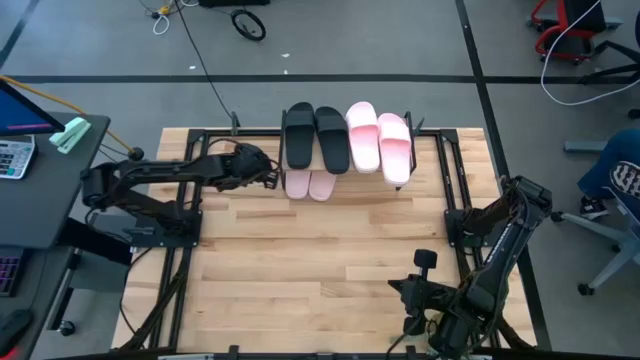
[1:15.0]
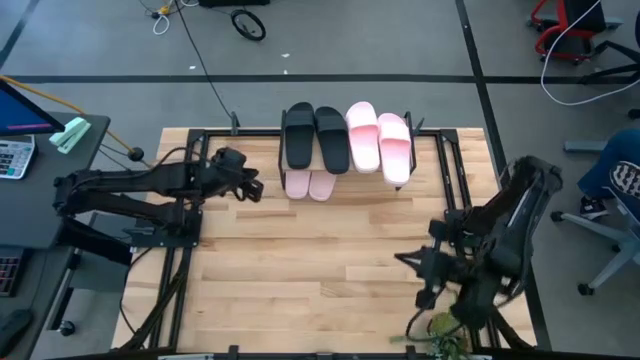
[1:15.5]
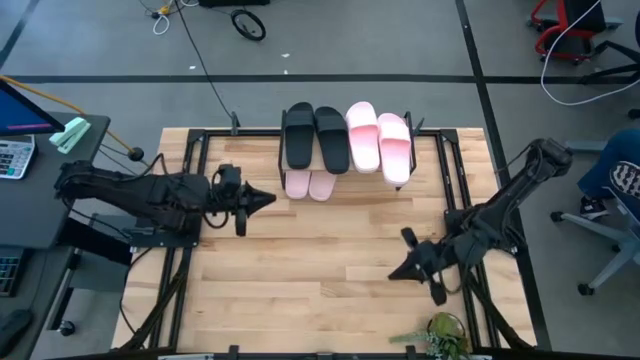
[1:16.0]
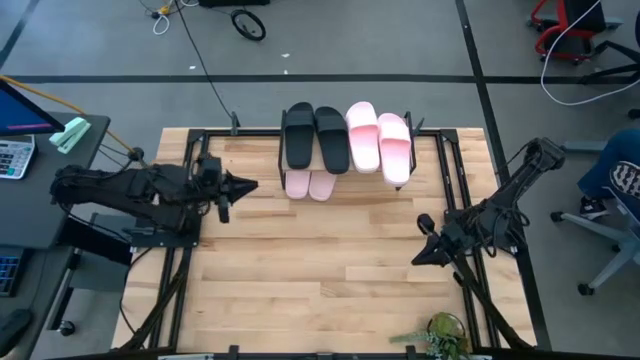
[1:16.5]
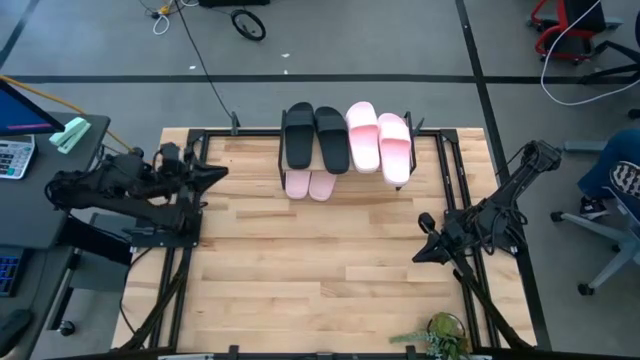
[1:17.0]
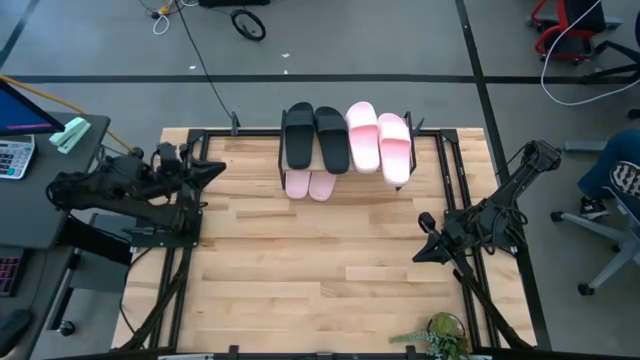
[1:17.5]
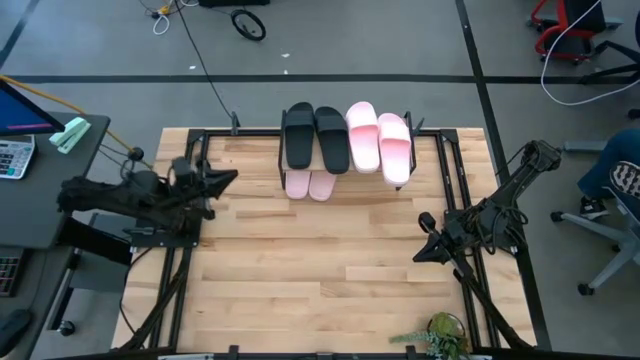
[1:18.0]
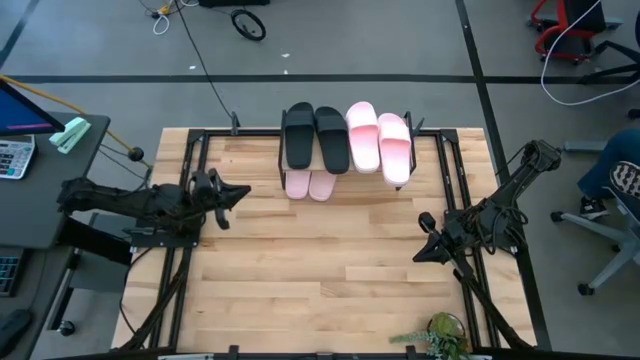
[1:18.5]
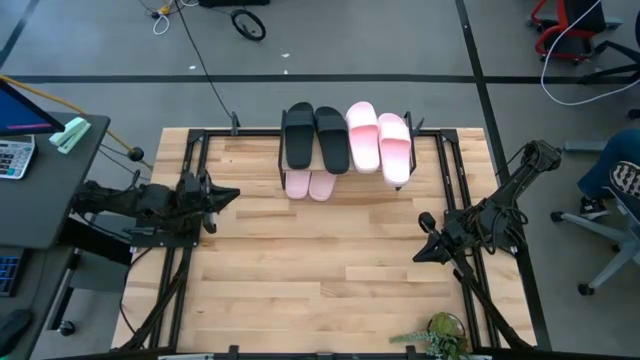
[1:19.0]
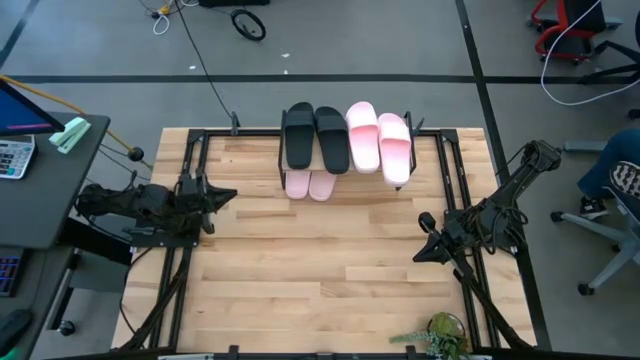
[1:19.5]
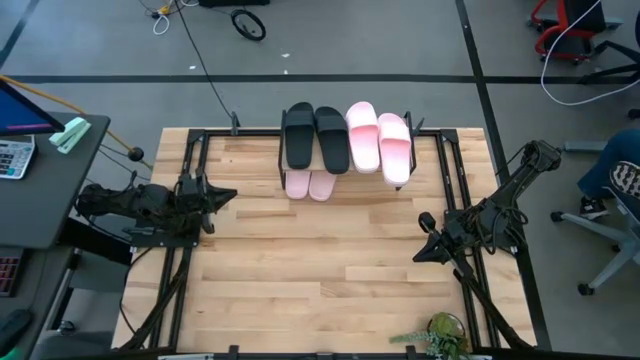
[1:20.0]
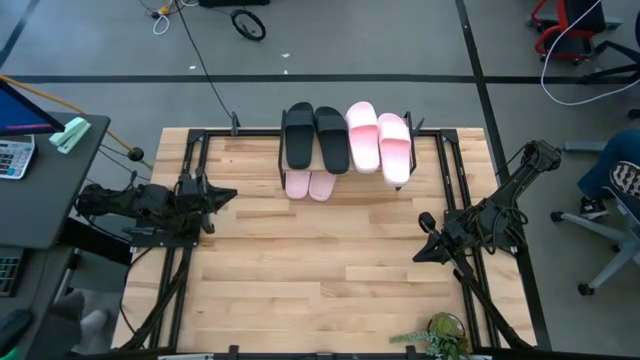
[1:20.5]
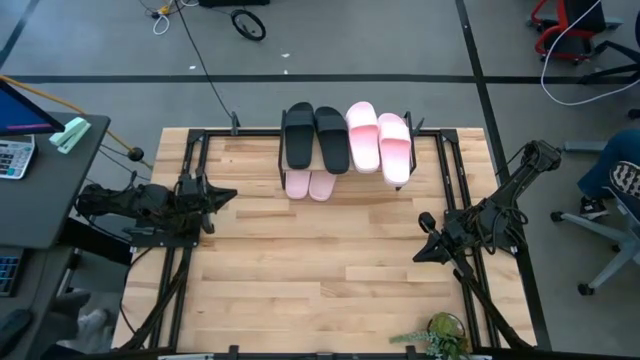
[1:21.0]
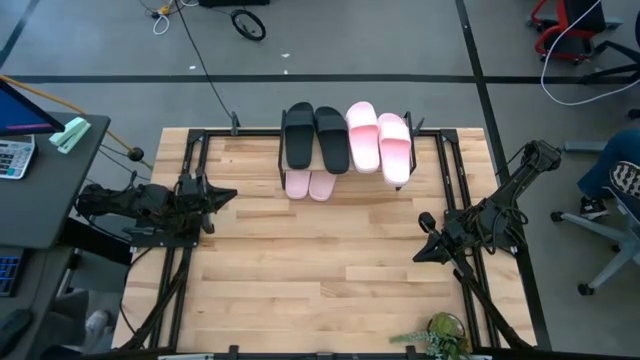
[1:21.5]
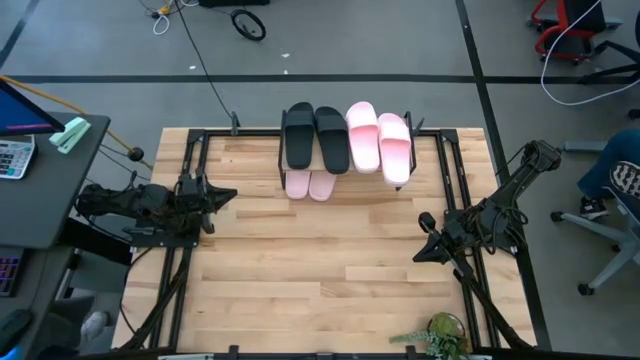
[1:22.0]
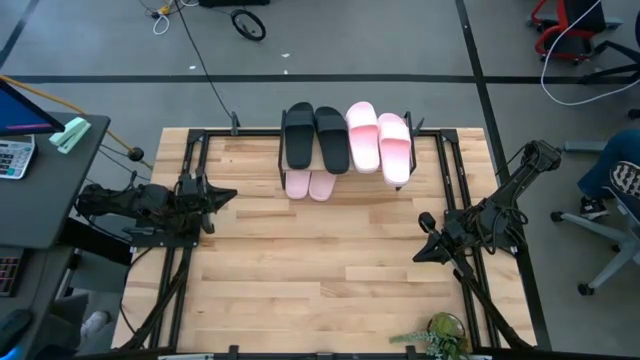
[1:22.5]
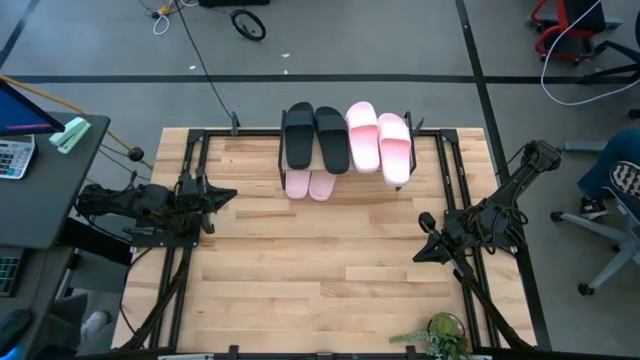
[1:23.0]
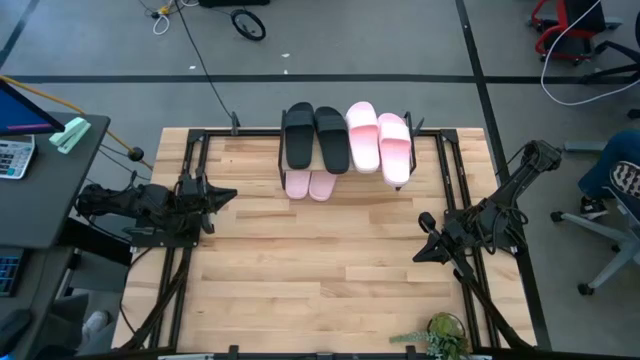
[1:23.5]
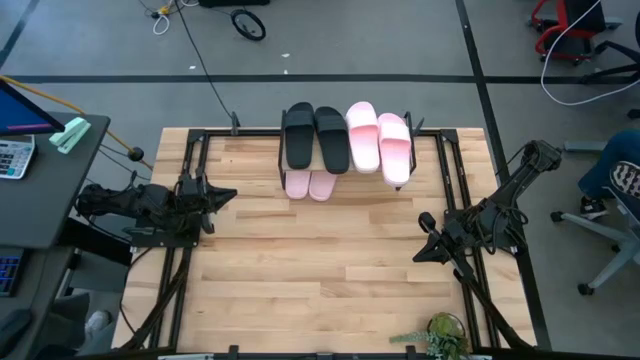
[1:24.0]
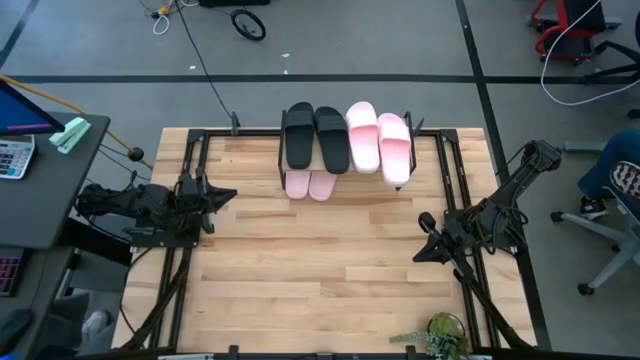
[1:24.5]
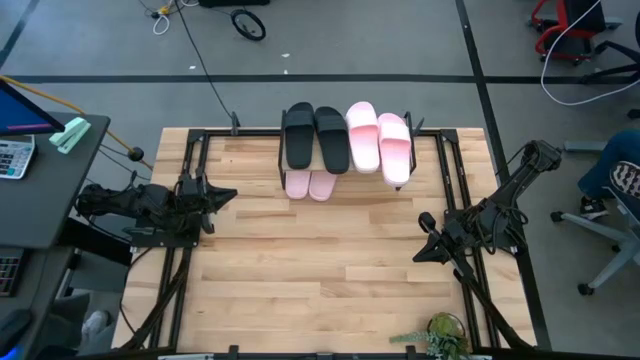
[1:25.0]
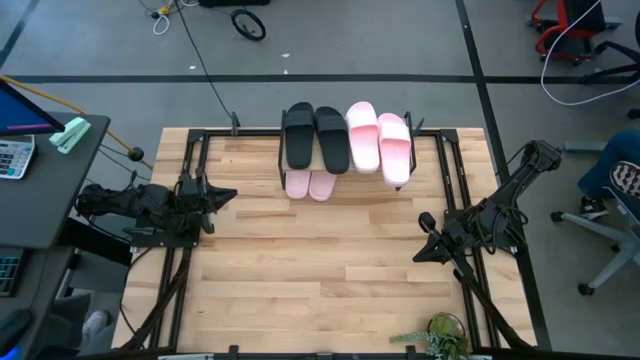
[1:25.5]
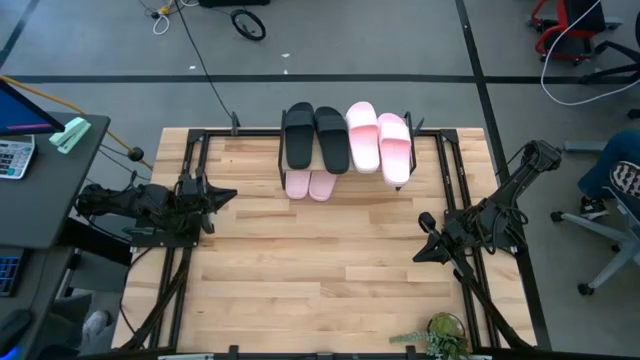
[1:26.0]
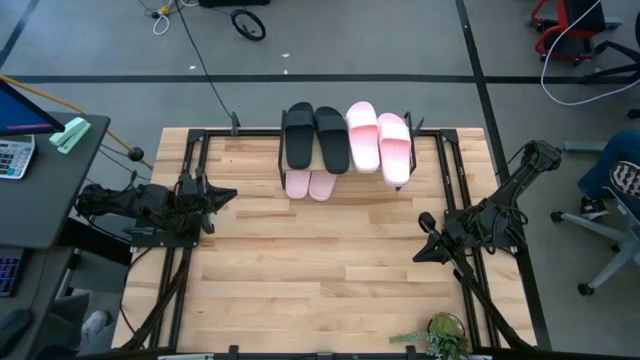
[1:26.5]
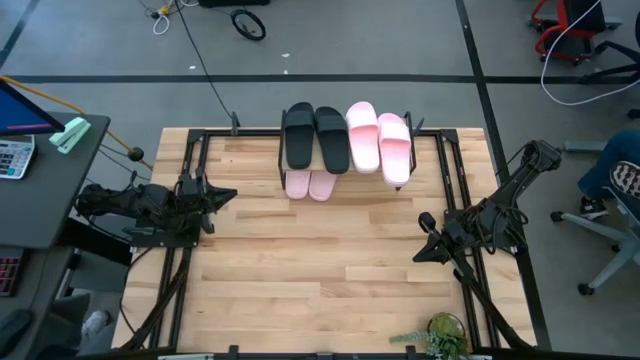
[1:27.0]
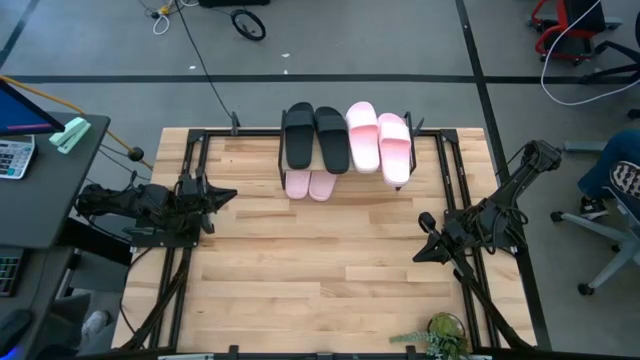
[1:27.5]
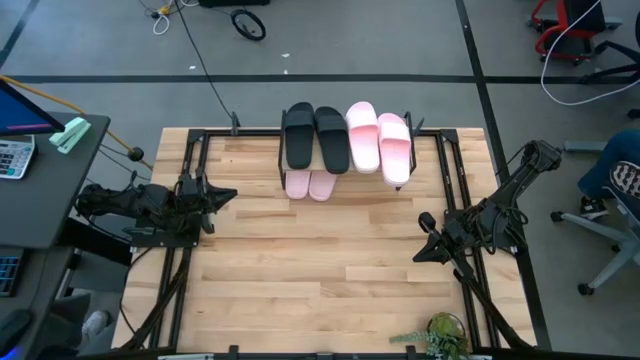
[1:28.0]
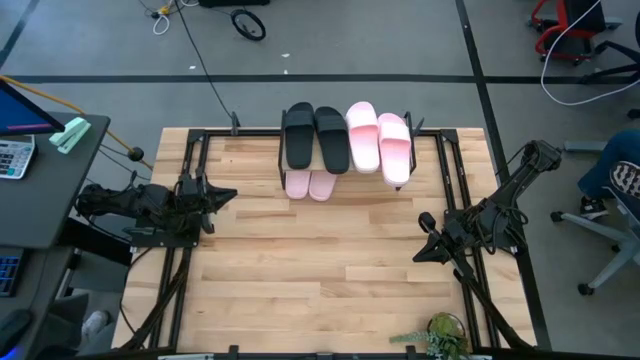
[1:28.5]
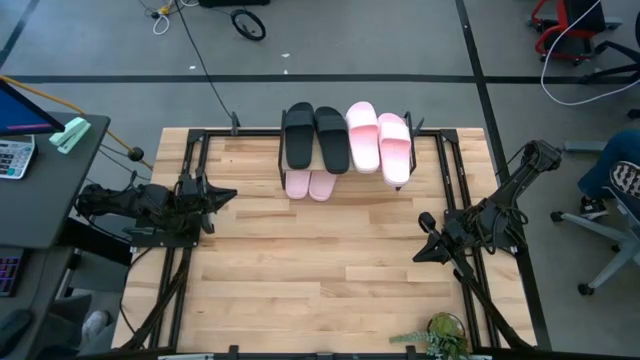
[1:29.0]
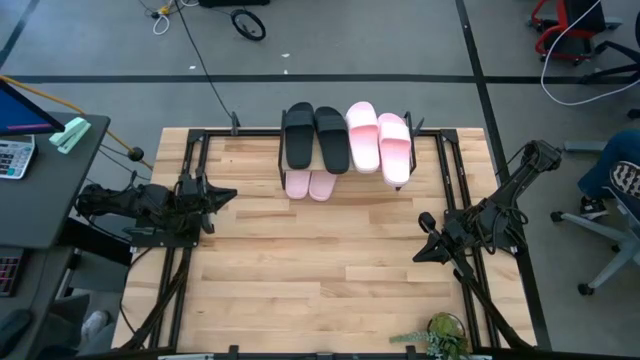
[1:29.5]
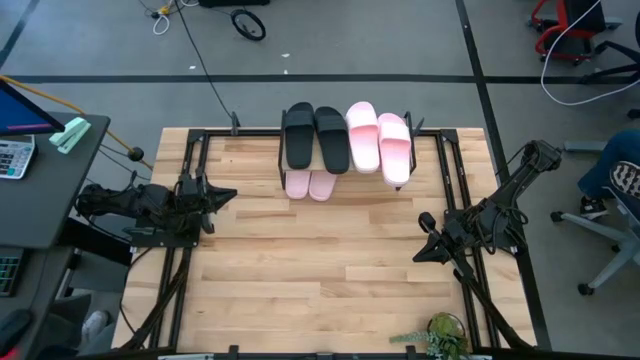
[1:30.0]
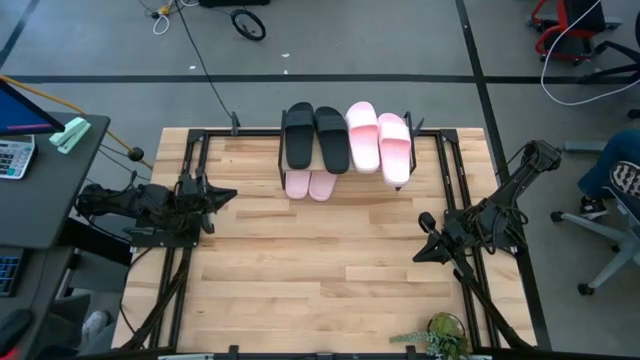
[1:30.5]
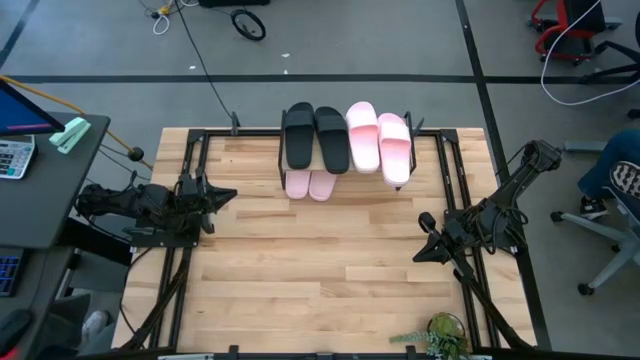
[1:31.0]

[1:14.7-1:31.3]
Task: Pick and place slides into the shelf
Return to Home Position

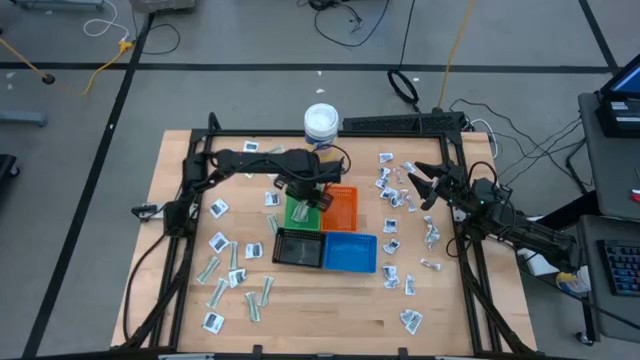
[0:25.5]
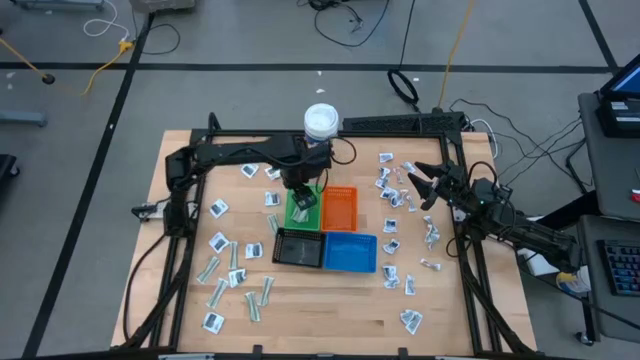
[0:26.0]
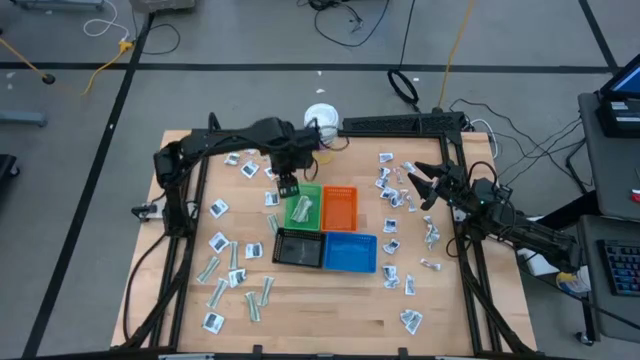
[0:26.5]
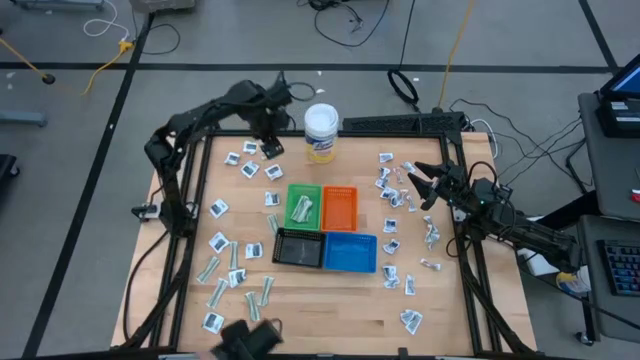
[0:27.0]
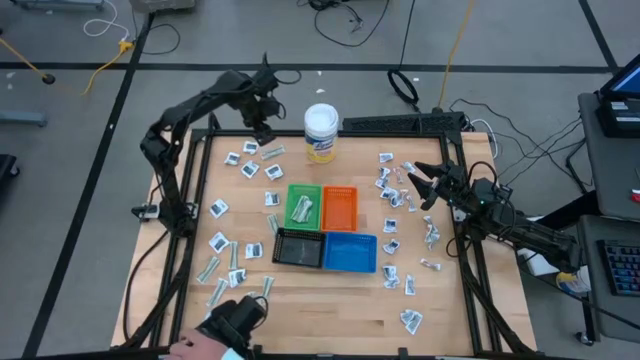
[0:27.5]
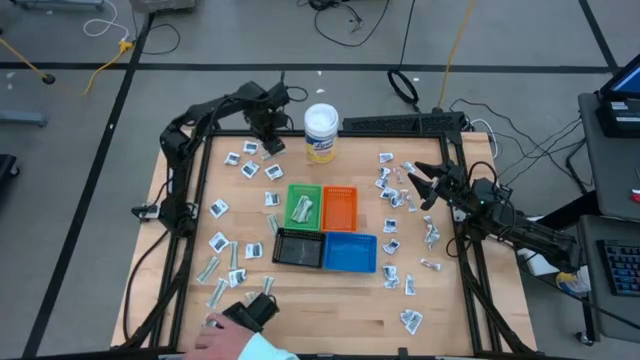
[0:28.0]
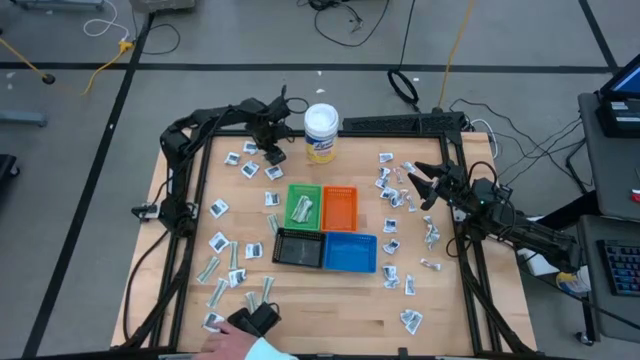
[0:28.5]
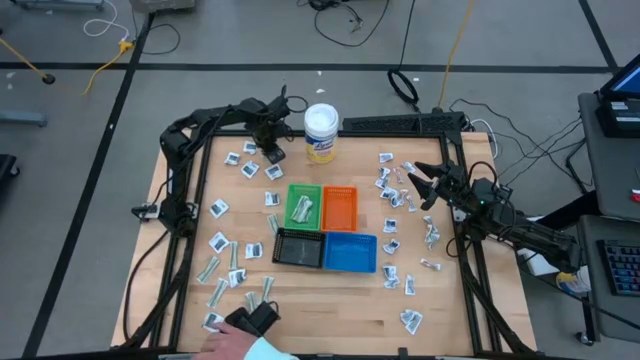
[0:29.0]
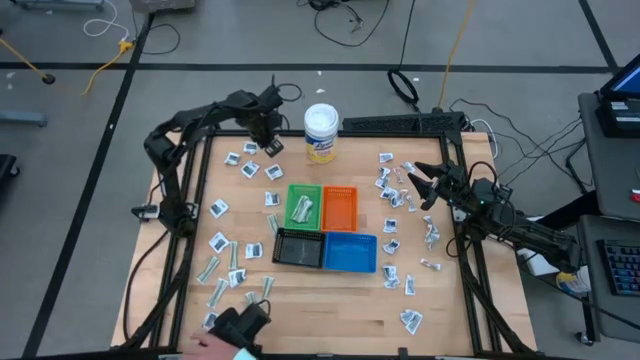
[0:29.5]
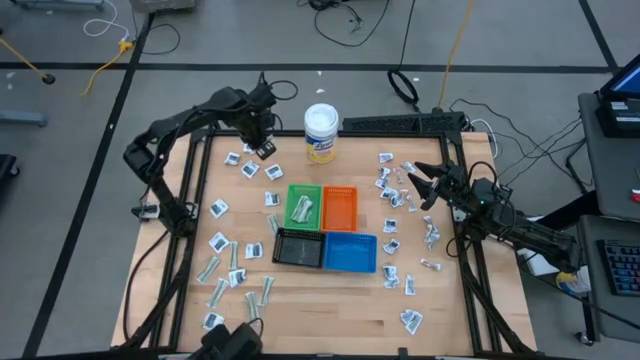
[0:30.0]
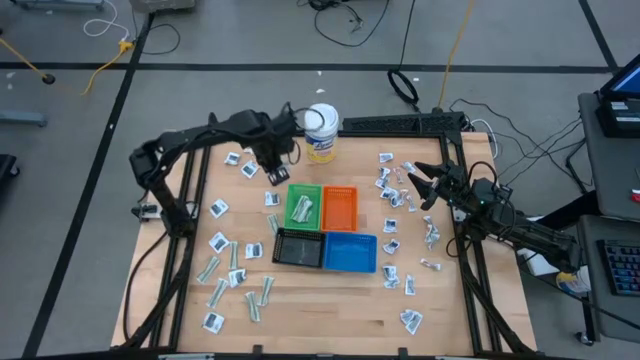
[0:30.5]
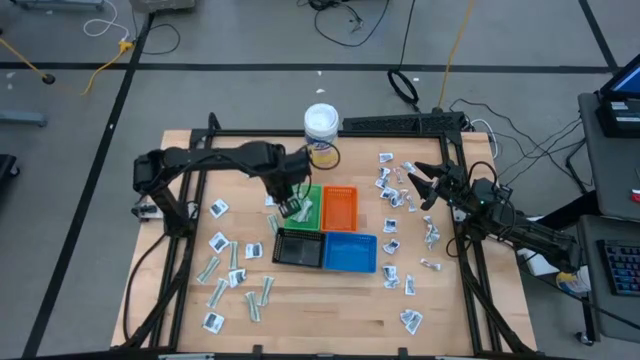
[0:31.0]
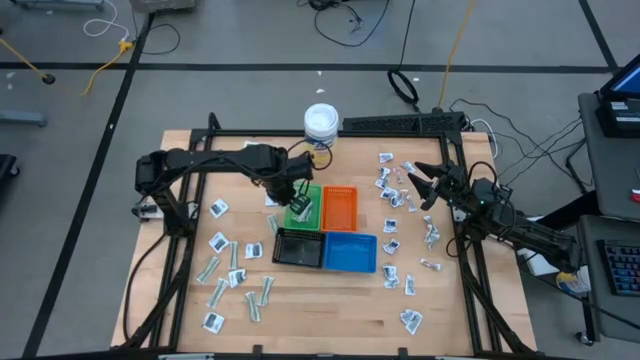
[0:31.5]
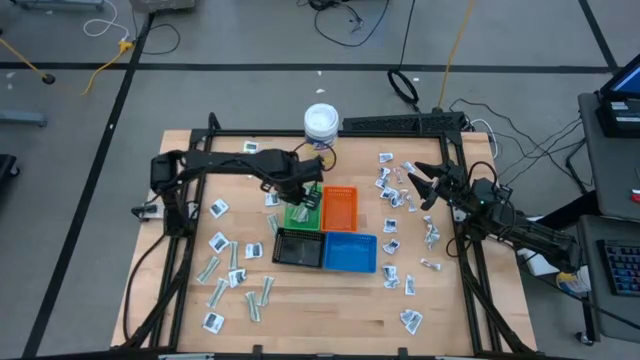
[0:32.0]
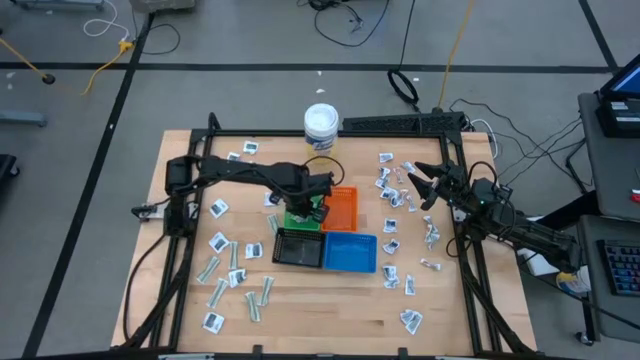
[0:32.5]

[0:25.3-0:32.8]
Task: Pick & Place First Aid Supplies
Put the bandage pack into the green bin
